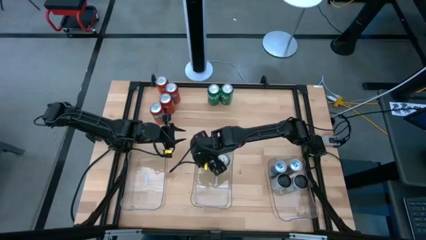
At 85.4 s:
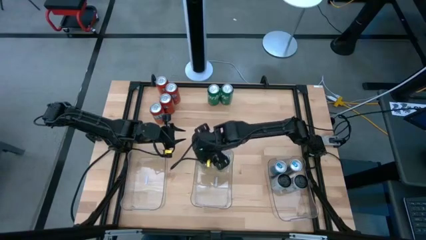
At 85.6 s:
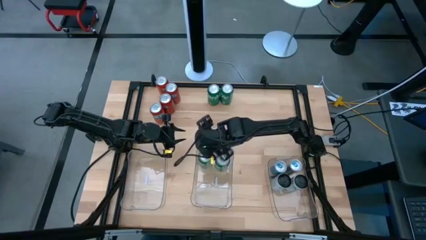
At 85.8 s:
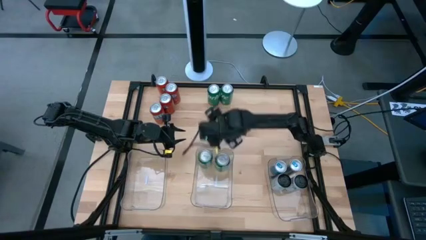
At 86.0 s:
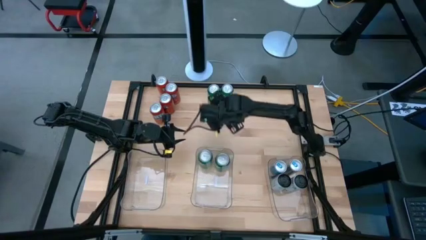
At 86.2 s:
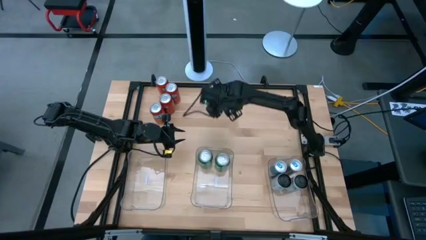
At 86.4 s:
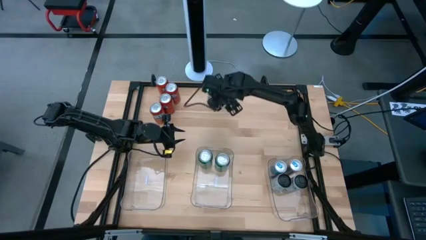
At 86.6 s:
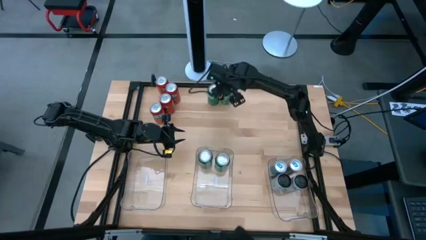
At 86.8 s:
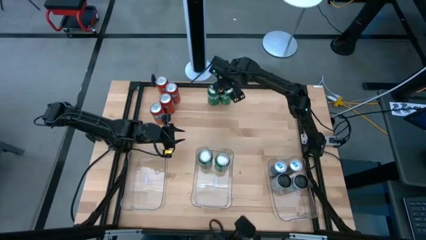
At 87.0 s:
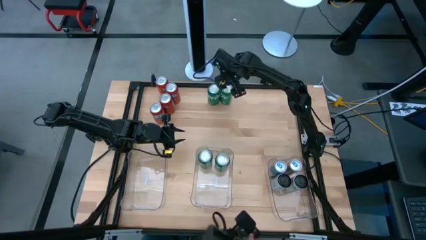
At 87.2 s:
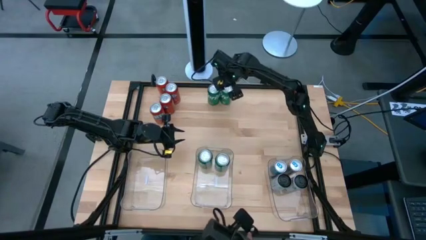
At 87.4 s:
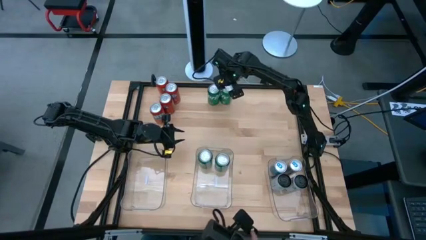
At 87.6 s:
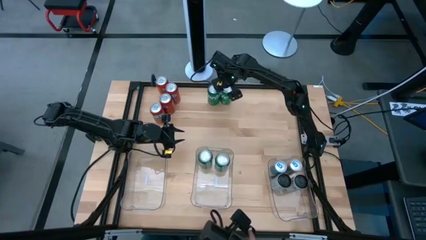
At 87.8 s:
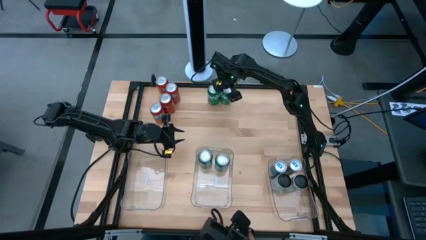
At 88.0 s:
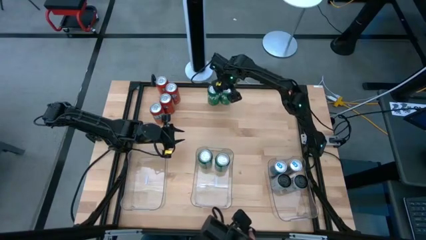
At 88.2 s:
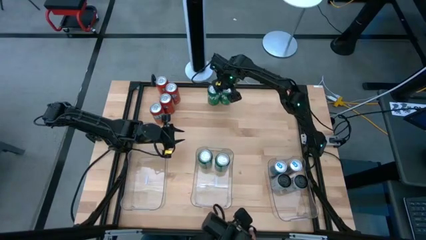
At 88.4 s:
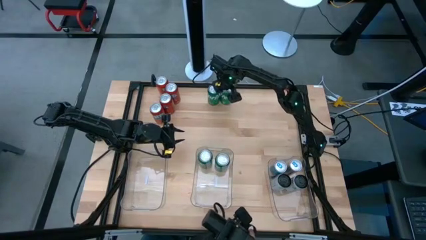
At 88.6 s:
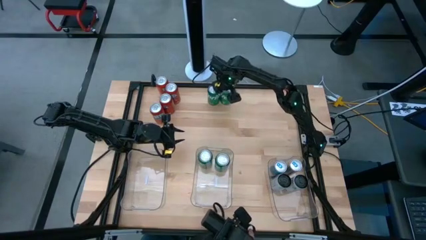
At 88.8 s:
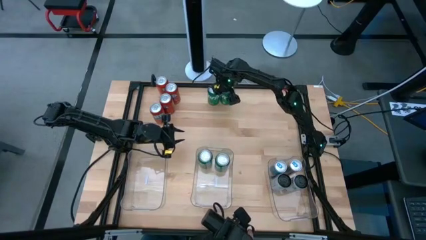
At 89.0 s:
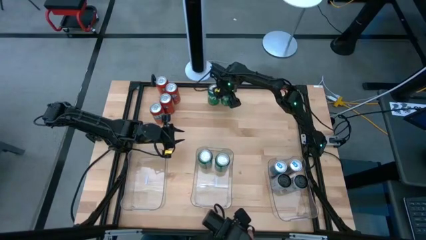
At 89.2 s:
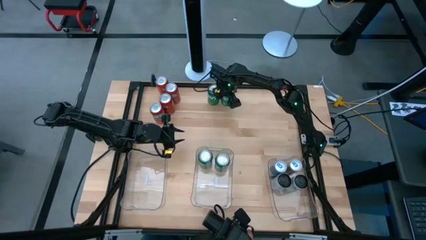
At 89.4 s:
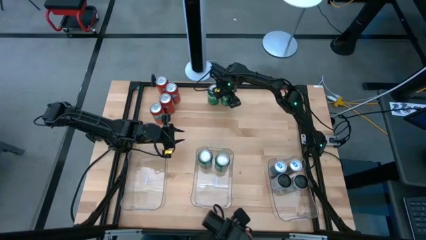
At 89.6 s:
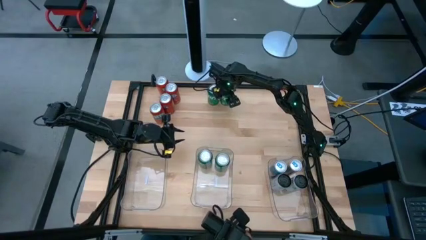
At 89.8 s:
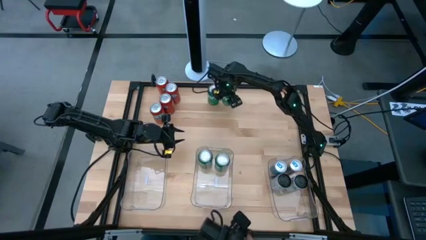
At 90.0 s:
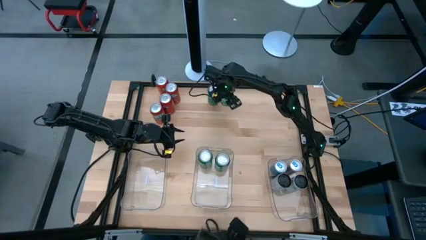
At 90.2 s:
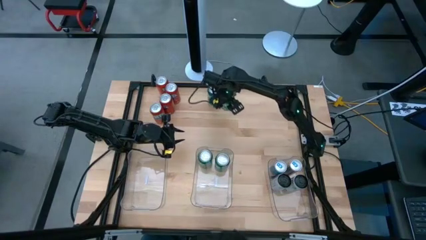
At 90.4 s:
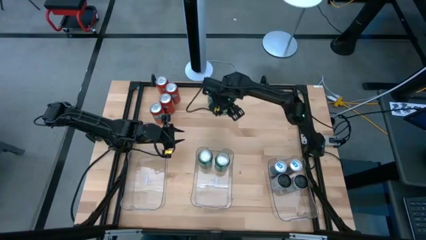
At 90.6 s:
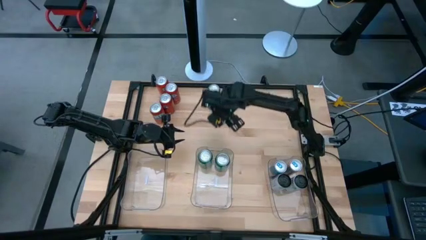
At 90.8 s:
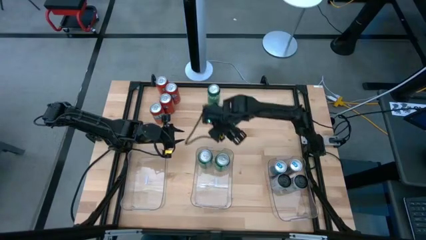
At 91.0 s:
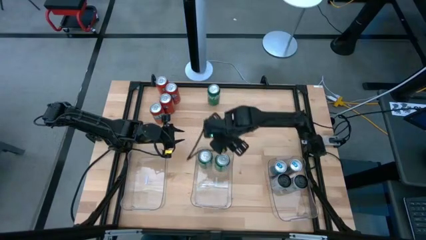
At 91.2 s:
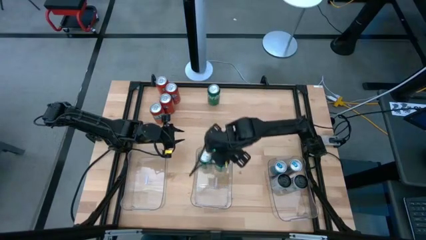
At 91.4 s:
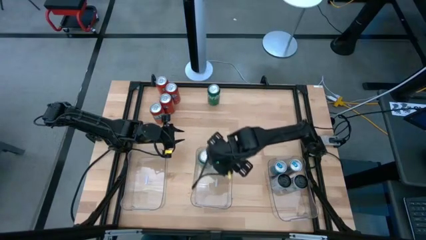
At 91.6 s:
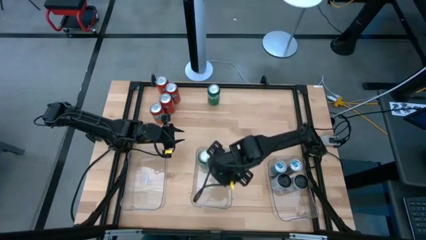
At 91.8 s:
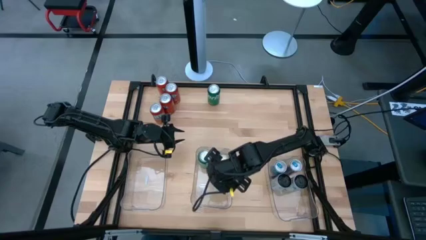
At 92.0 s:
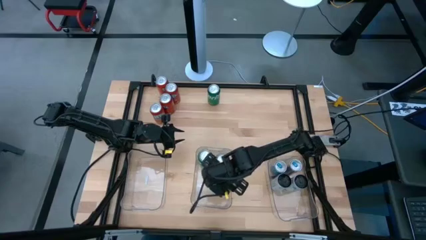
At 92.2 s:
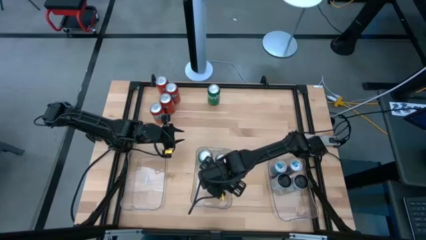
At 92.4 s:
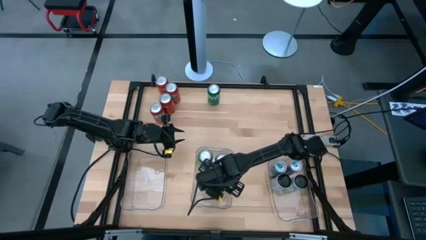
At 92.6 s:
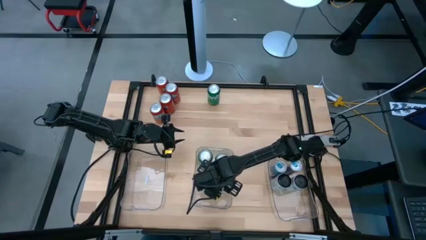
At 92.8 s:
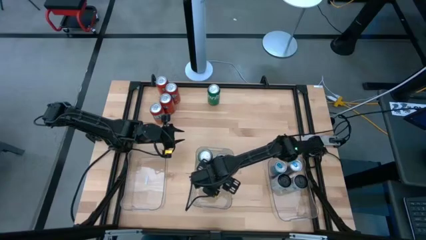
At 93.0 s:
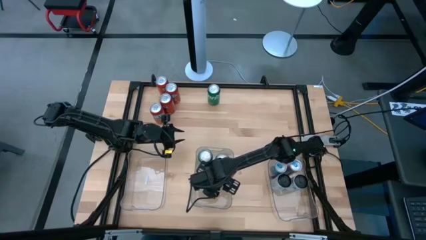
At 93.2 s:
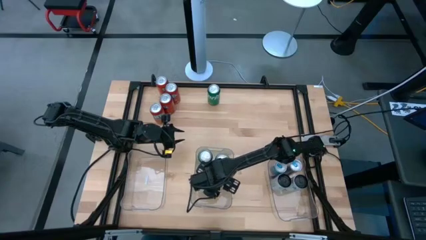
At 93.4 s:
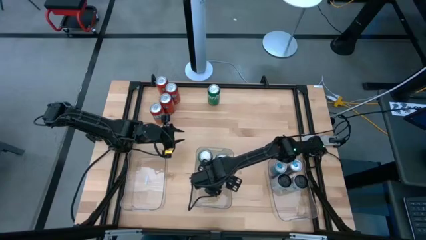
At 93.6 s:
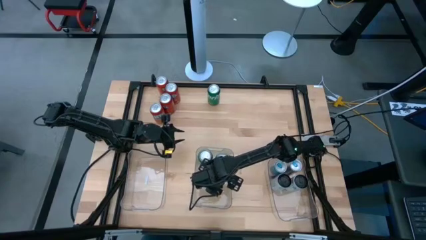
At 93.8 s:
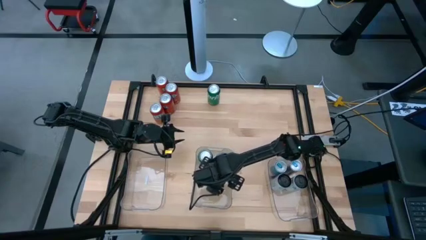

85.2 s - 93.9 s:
Task: Sort soda cans
Put the green soda can into the center transparent bin
